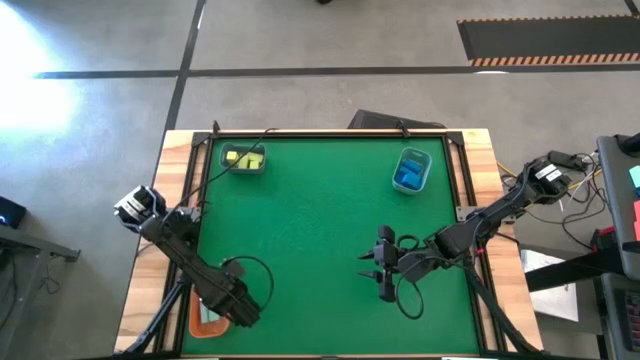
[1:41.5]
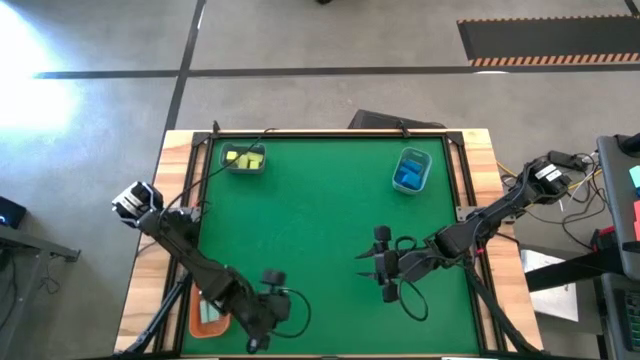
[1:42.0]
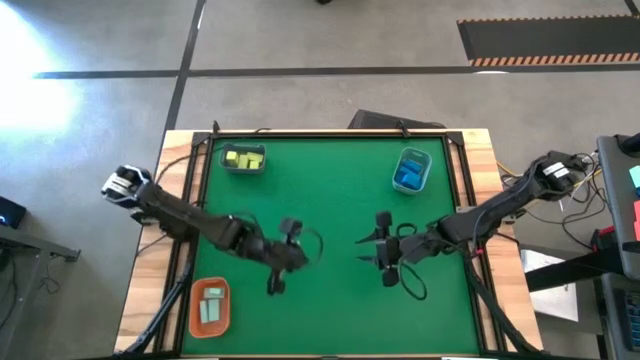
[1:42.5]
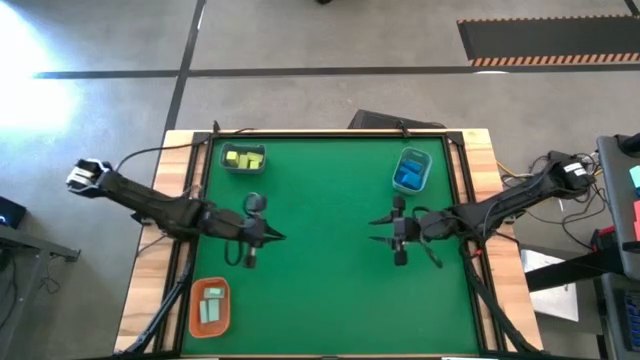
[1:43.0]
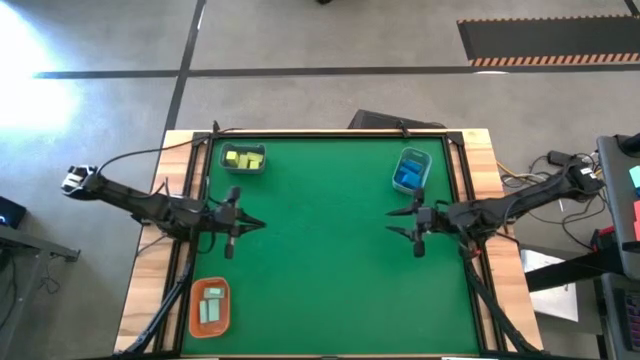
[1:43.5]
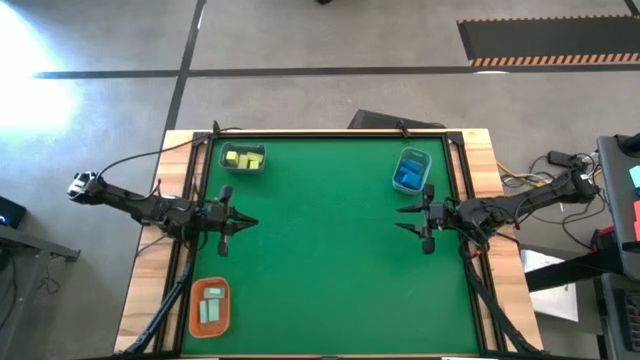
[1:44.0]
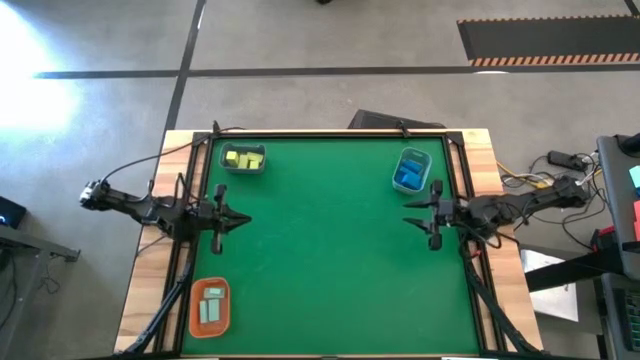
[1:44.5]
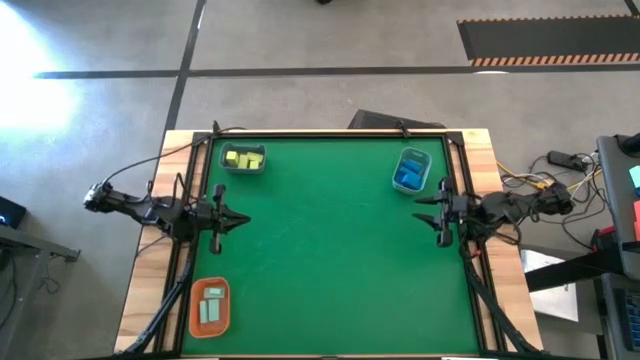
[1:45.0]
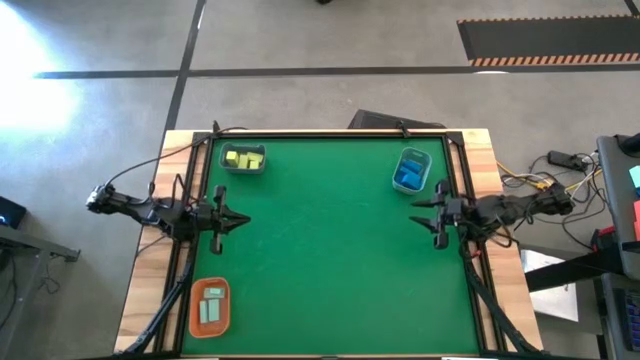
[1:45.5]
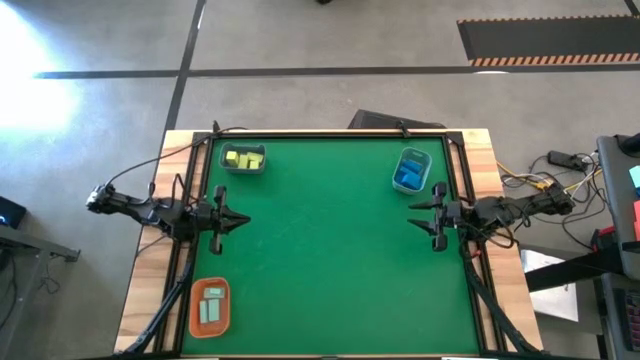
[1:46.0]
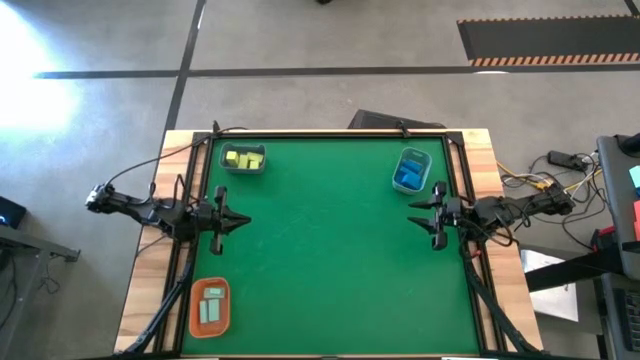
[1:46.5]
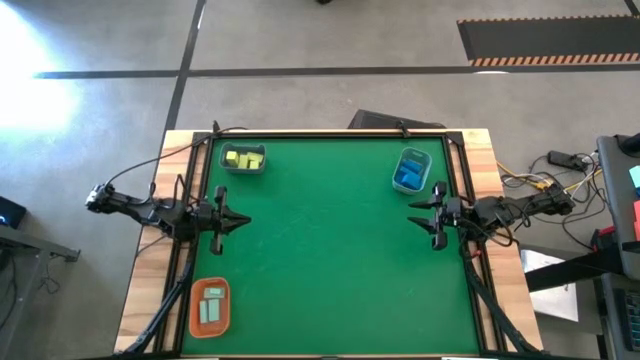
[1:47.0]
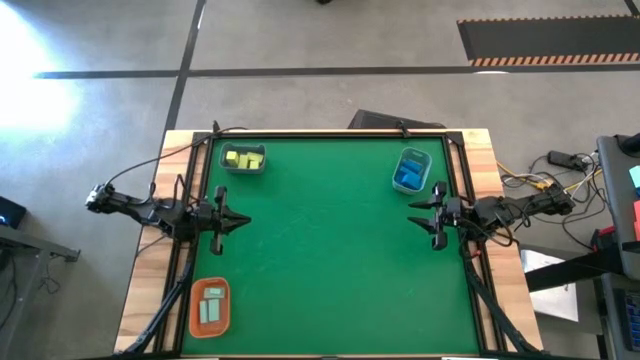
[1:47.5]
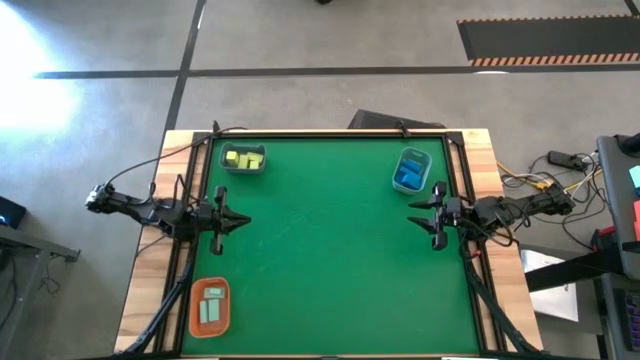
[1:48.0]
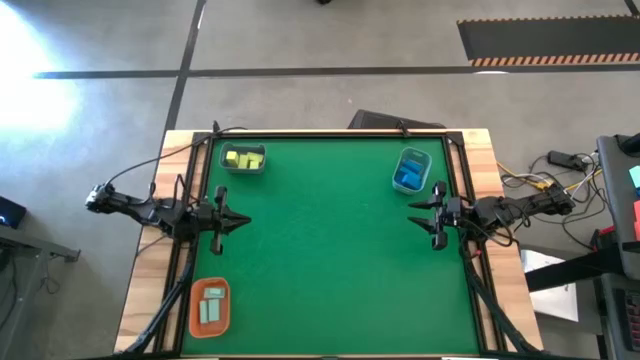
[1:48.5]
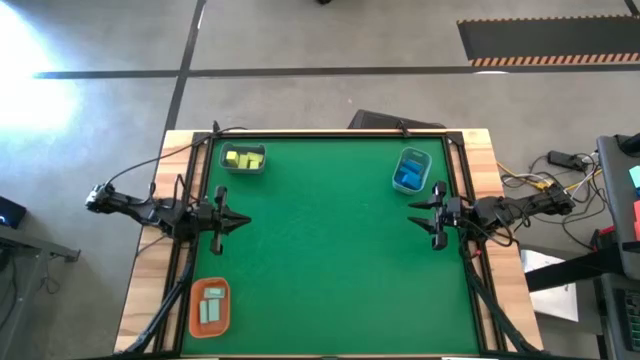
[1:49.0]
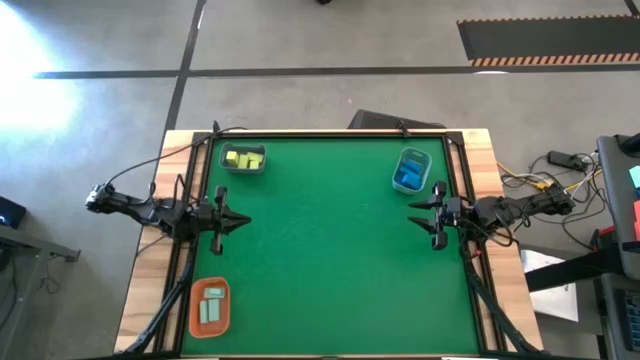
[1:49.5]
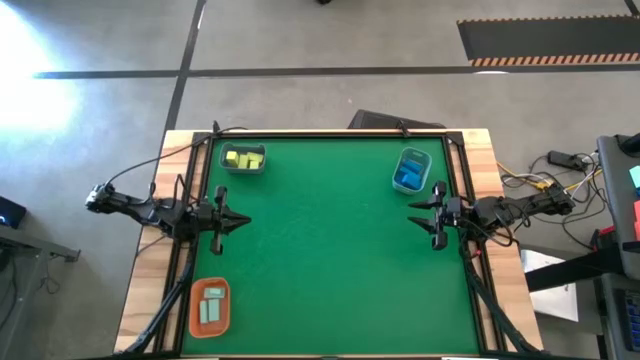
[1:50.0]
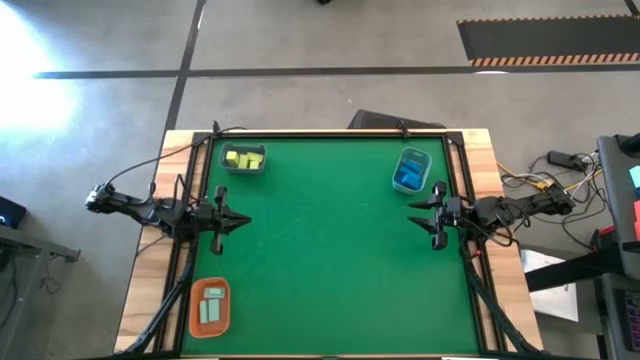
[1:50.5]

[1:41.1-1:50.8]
Task: Sort & place blocks by color
Return to Home Position

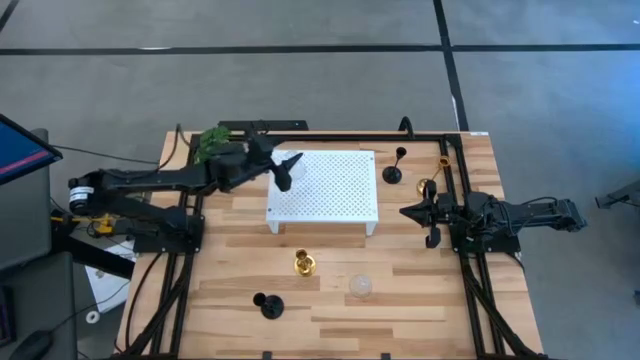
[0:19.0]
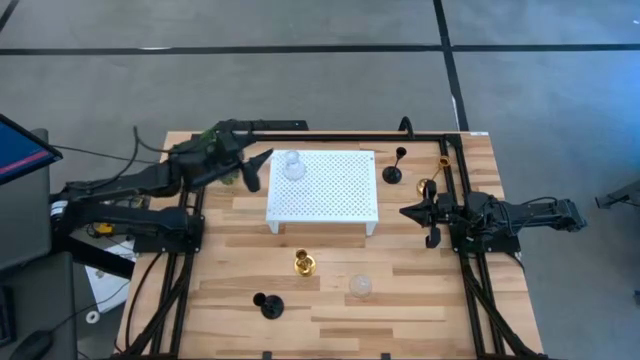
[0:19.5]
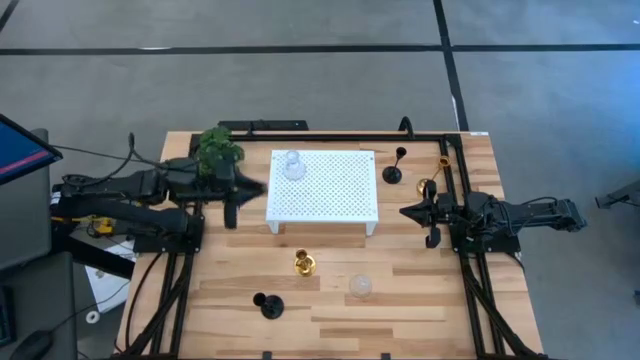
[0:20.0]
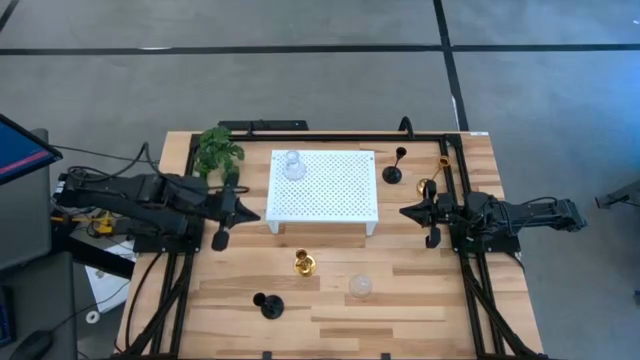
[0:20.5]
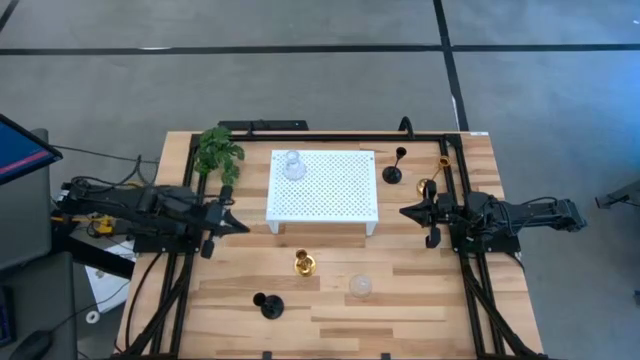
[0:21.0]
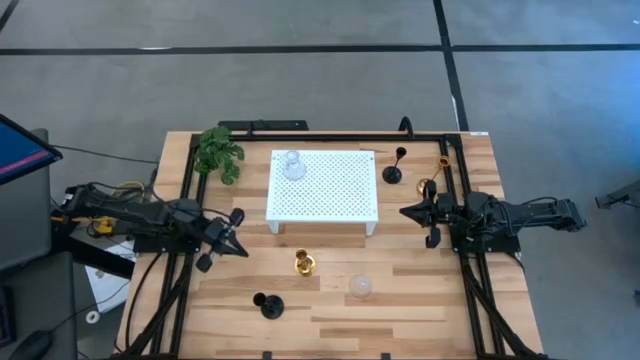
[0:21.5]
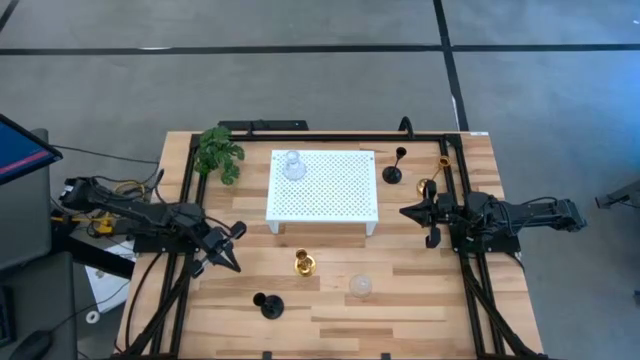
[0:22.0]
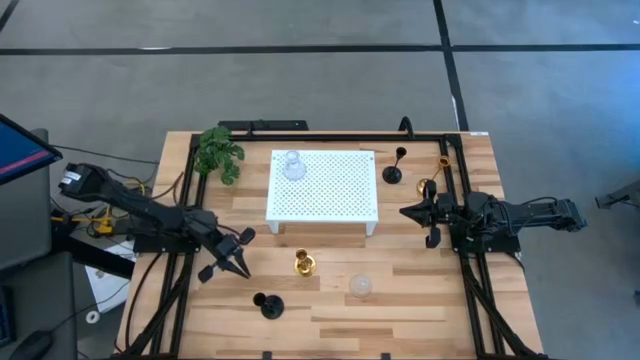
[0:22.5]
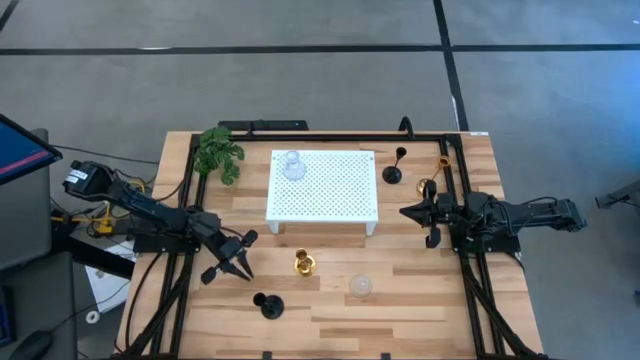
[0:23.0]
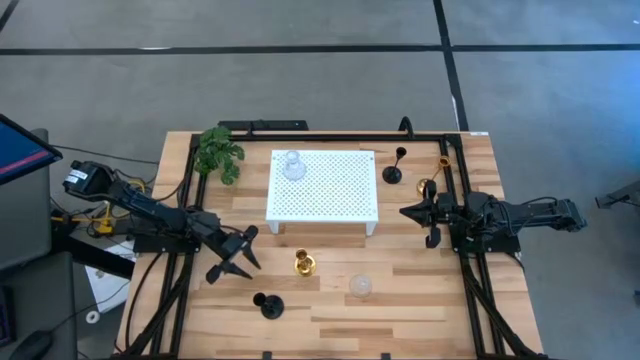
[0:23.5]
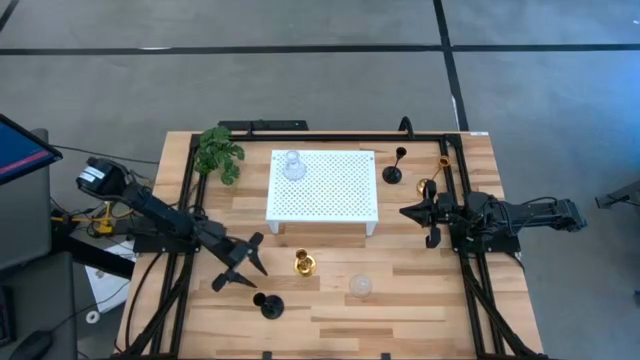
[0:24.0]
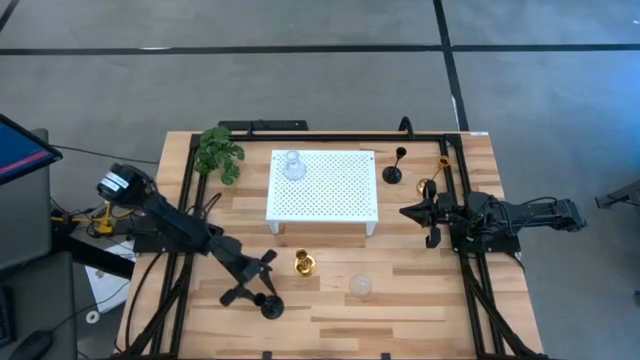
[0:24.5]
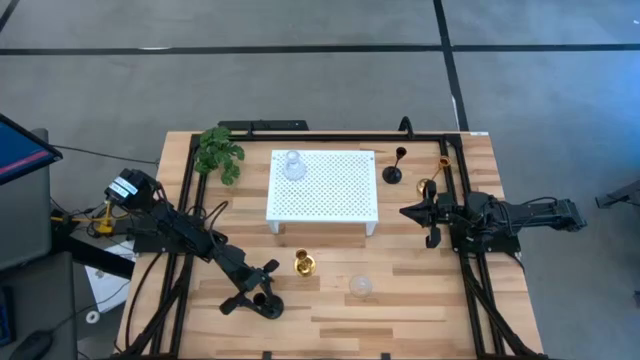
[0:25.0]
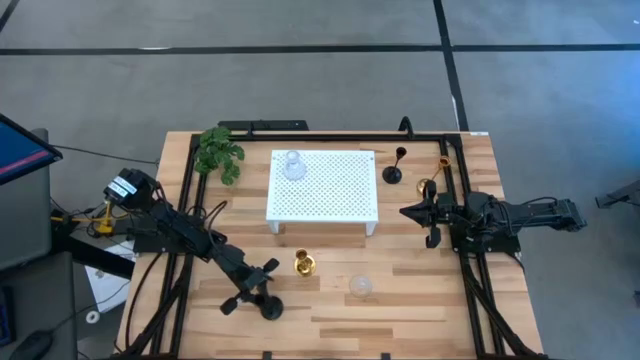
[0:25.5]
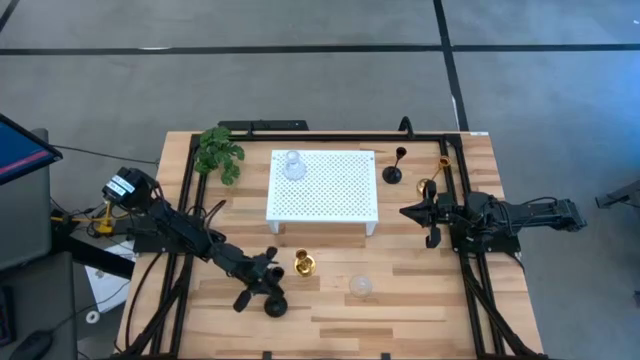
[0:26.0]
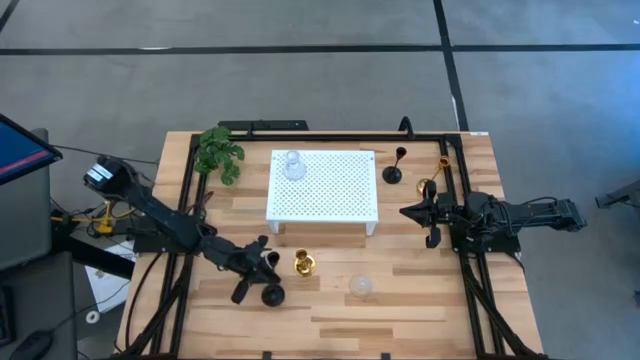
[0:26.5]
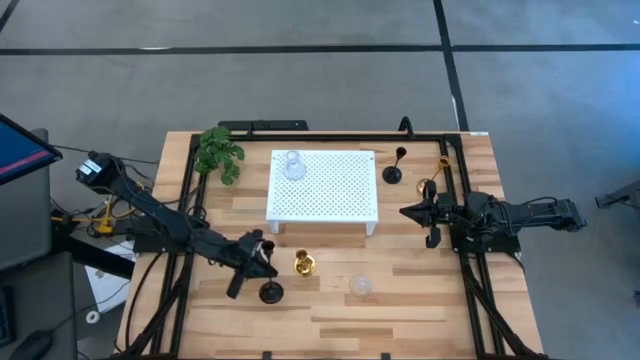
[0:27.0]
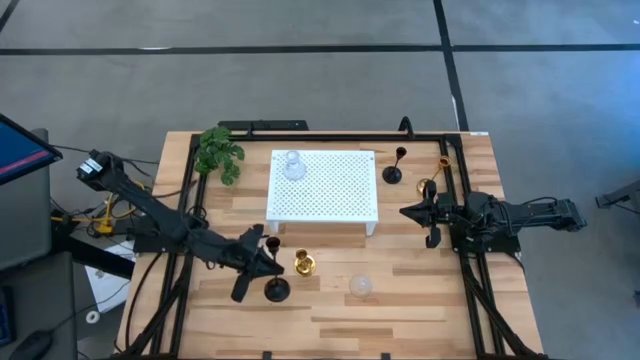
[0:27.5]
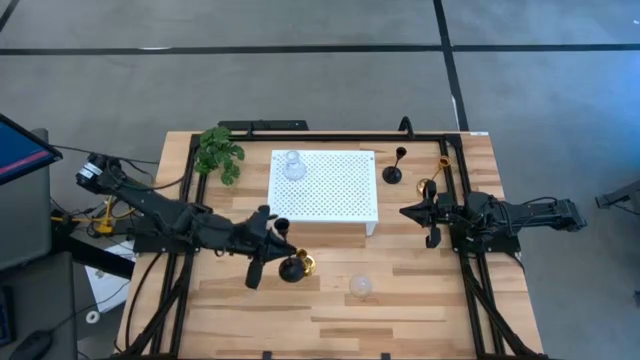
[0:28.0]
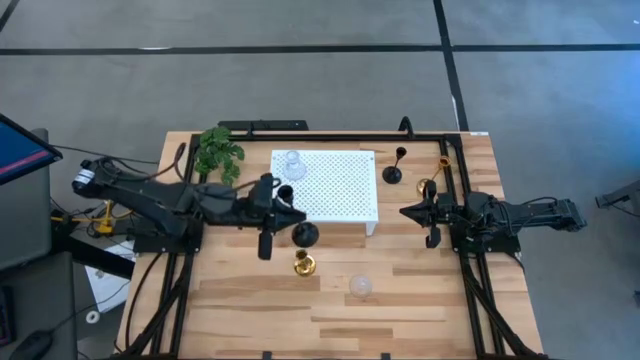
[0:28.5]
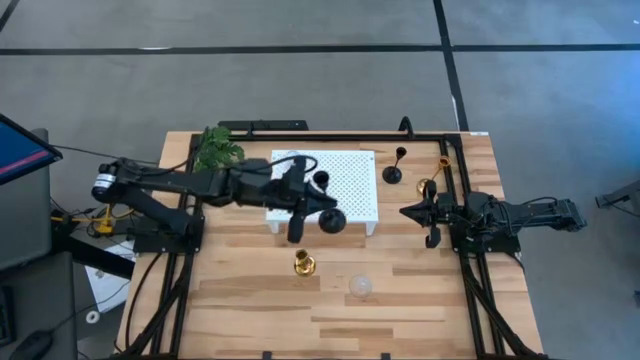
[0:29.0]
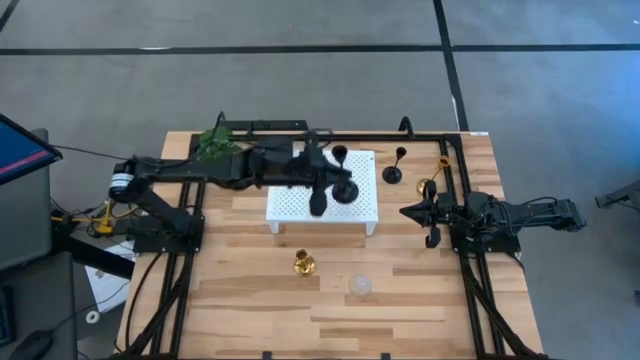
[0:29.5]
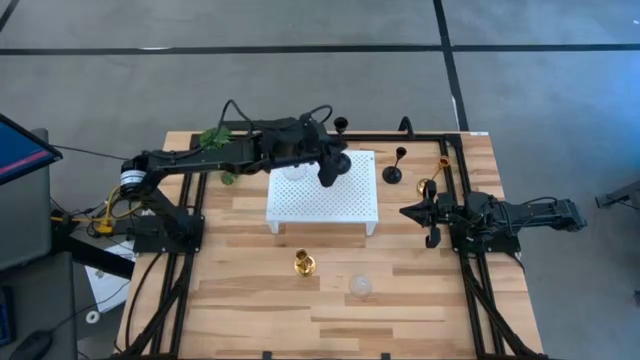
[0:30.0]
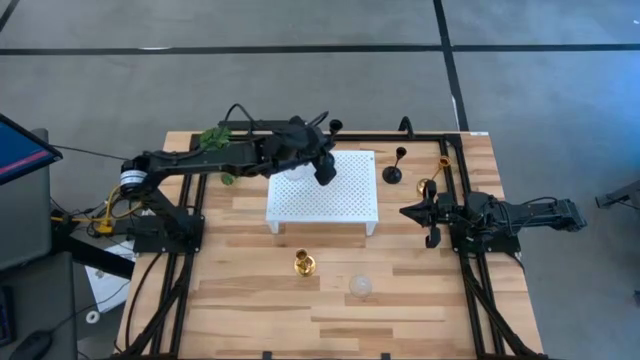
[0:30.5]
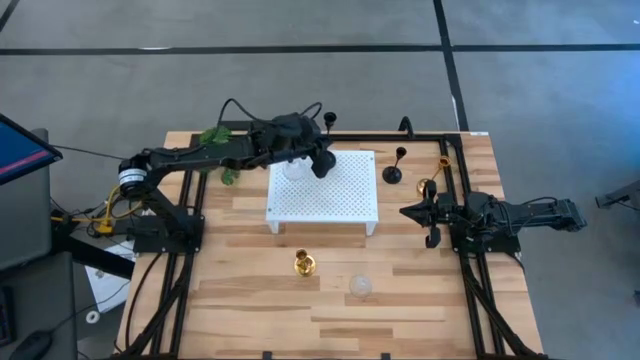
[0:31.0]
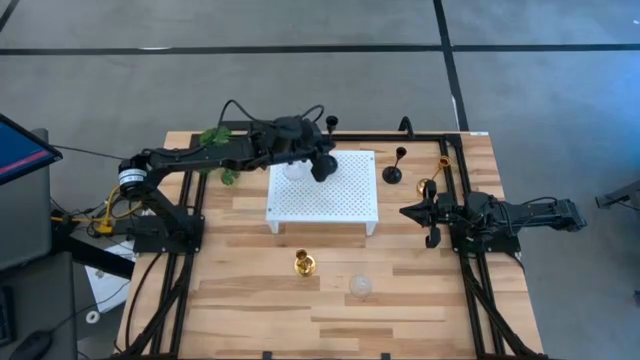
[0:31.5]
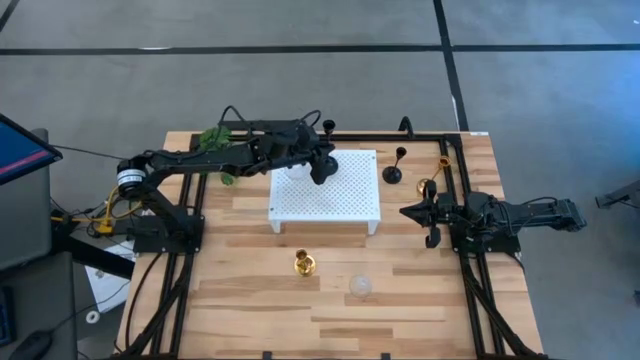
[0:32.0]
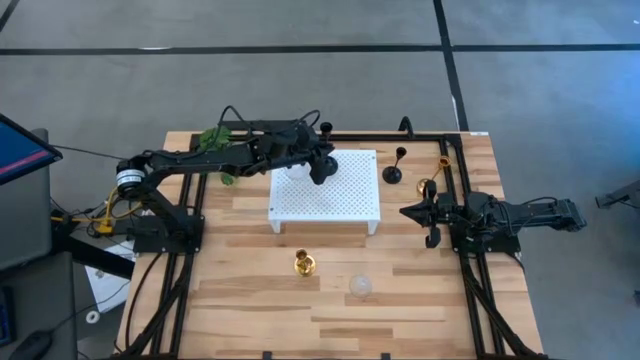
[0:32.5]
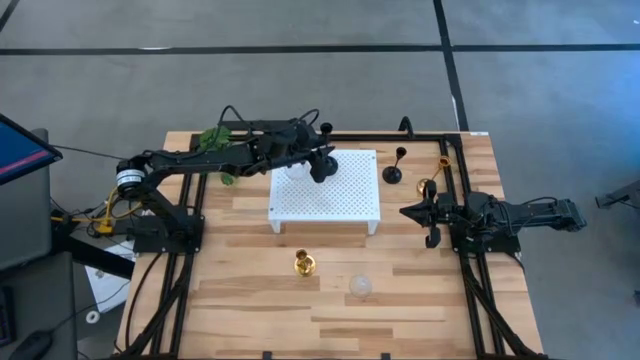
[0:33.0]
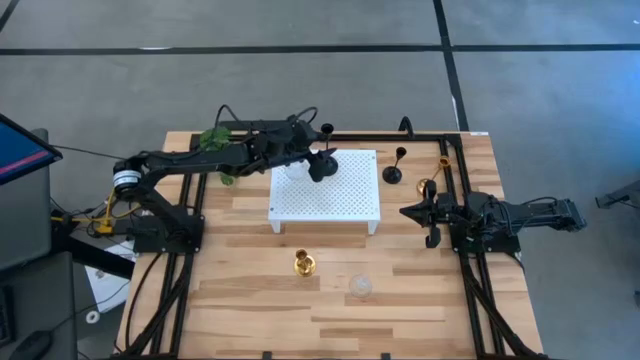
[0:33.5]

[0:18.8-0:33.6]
Task: Pick & Place candle stick holders
Put the bottom black candle holder on the shelf
